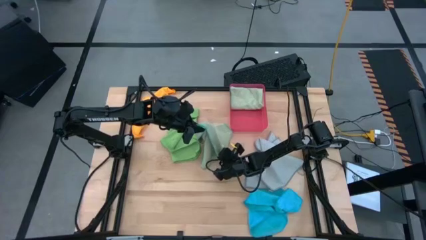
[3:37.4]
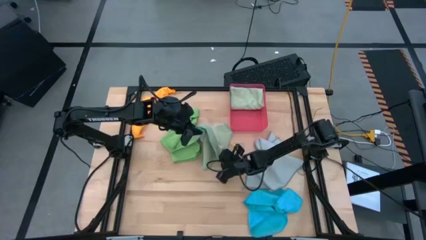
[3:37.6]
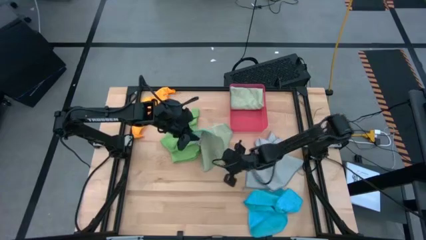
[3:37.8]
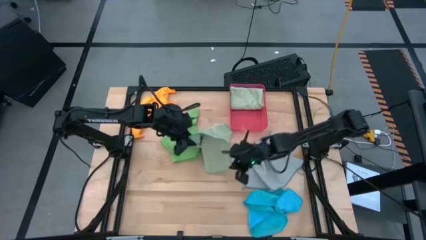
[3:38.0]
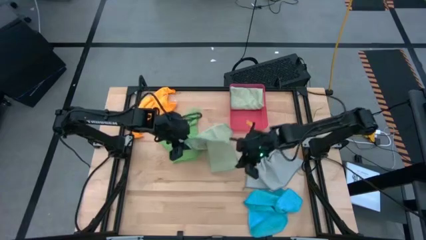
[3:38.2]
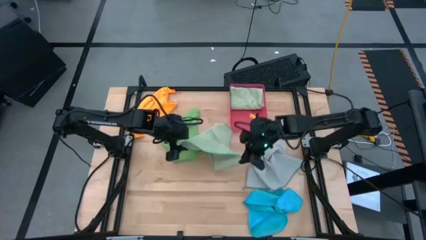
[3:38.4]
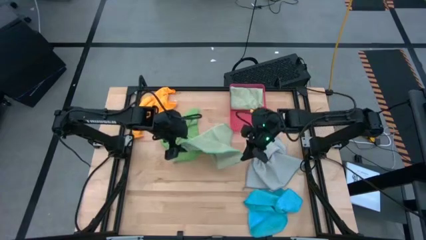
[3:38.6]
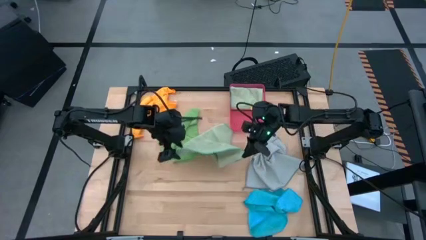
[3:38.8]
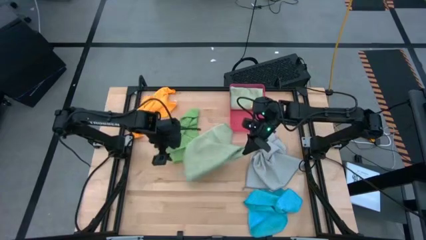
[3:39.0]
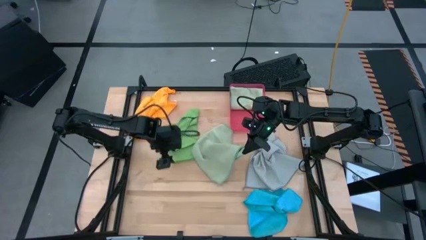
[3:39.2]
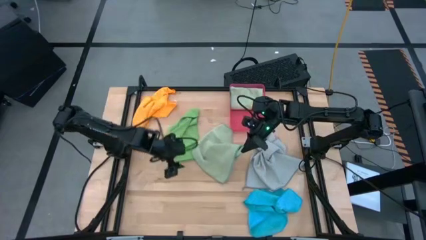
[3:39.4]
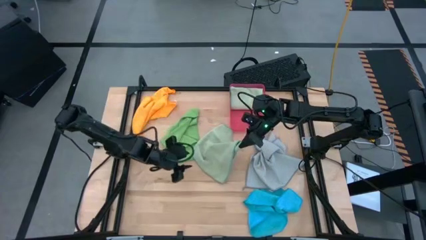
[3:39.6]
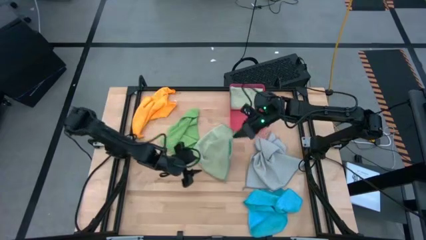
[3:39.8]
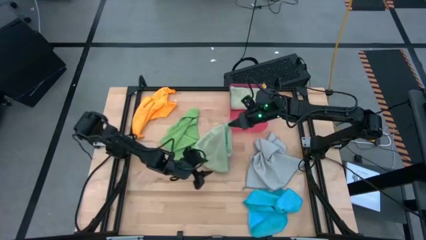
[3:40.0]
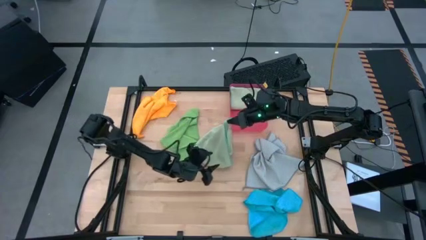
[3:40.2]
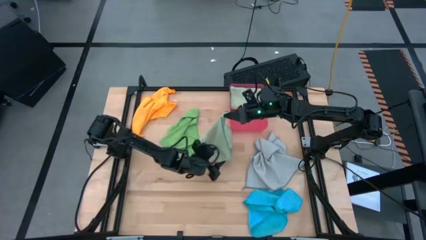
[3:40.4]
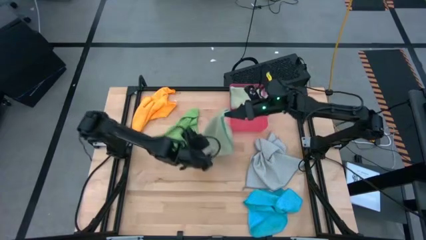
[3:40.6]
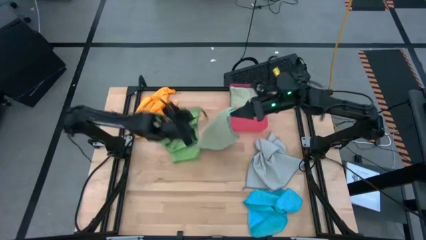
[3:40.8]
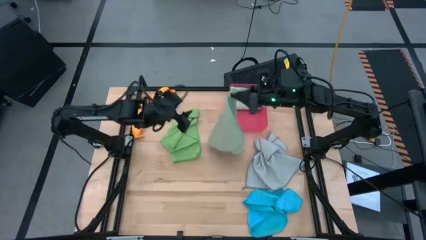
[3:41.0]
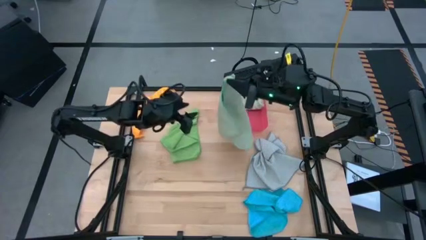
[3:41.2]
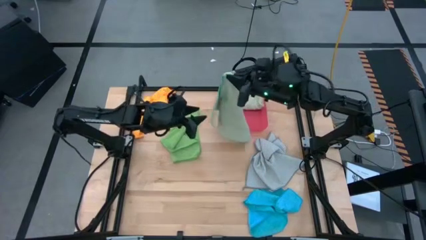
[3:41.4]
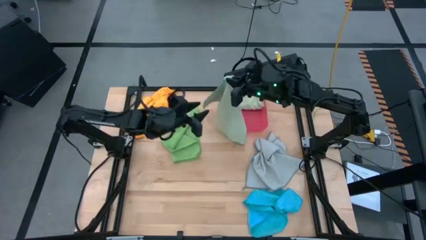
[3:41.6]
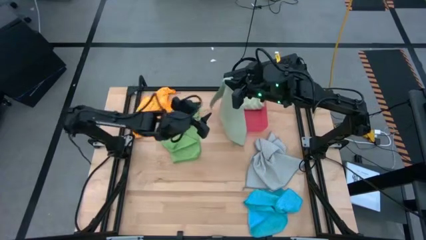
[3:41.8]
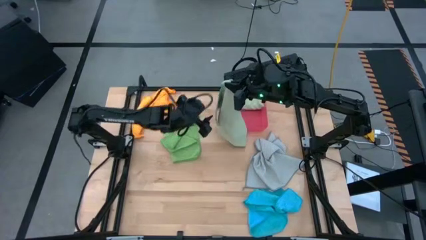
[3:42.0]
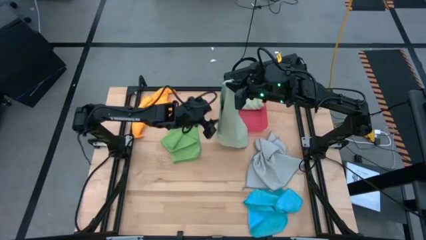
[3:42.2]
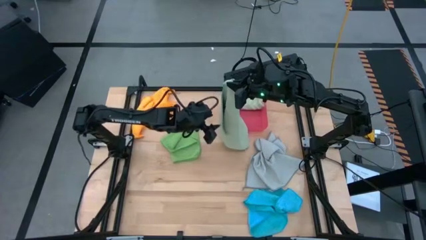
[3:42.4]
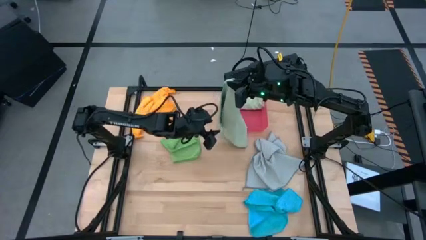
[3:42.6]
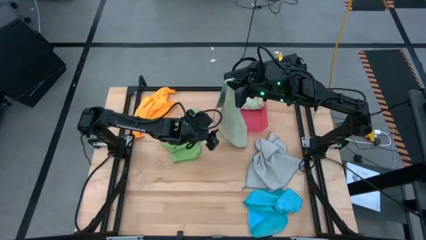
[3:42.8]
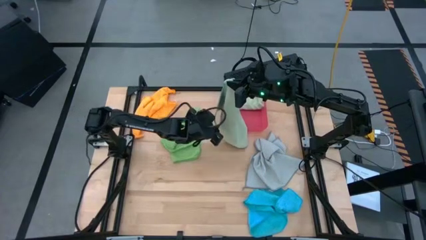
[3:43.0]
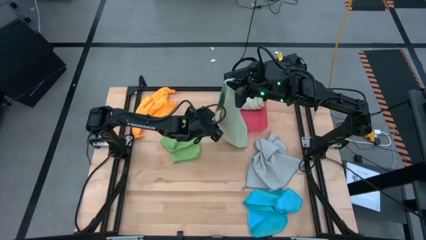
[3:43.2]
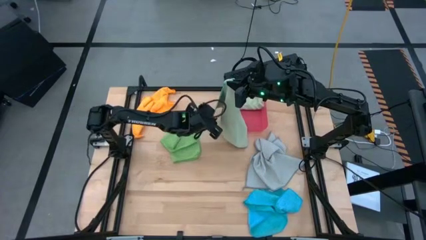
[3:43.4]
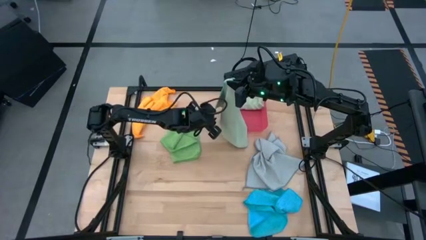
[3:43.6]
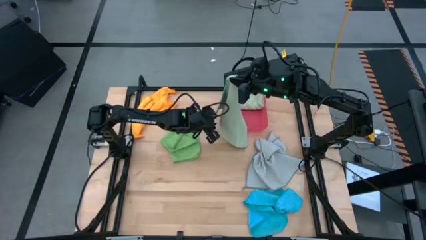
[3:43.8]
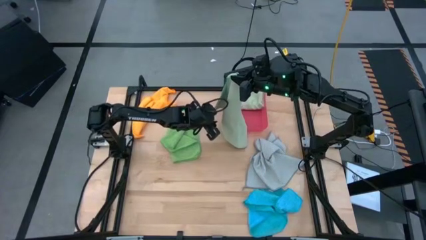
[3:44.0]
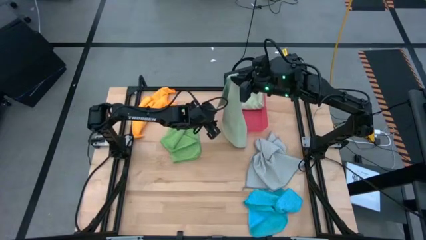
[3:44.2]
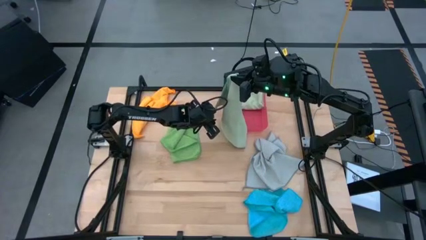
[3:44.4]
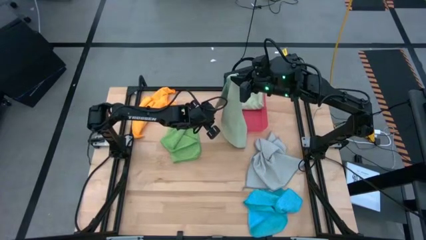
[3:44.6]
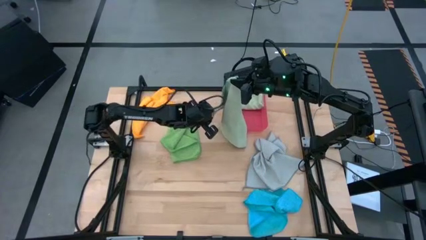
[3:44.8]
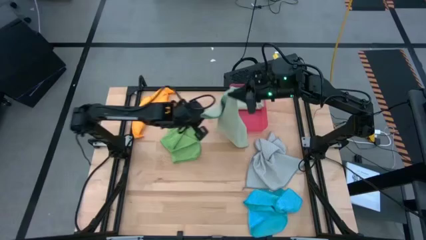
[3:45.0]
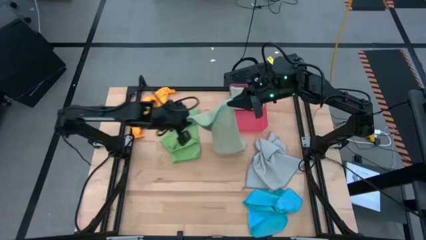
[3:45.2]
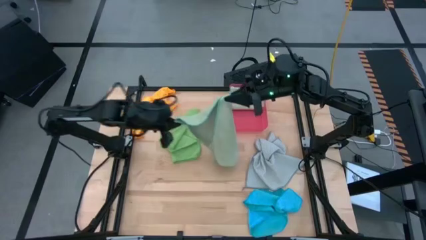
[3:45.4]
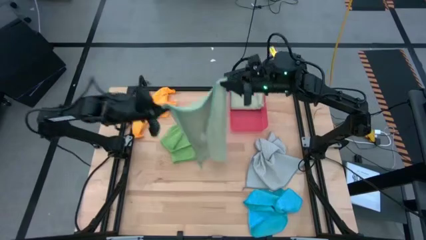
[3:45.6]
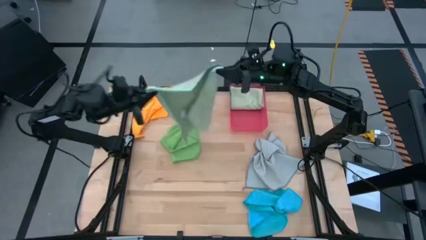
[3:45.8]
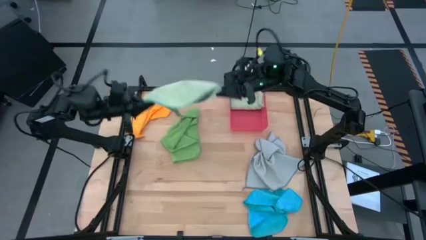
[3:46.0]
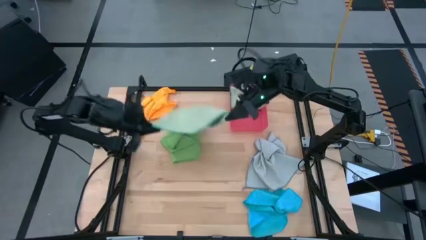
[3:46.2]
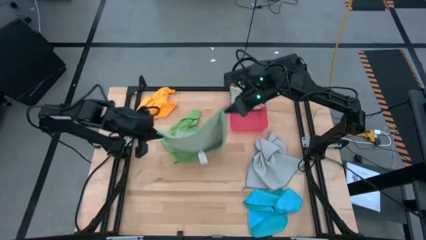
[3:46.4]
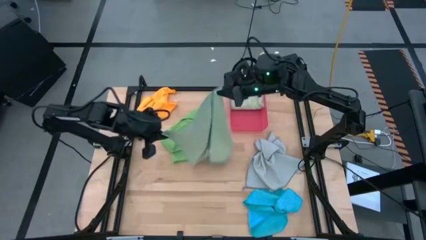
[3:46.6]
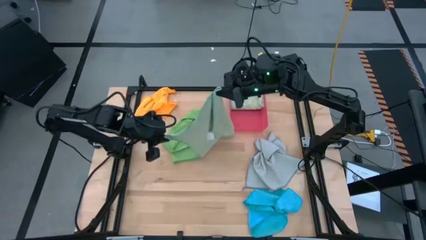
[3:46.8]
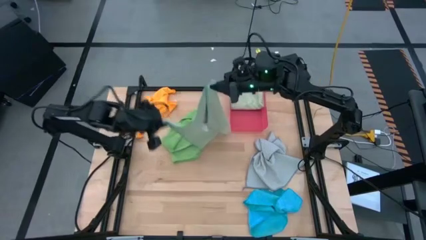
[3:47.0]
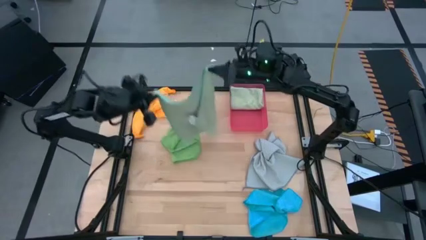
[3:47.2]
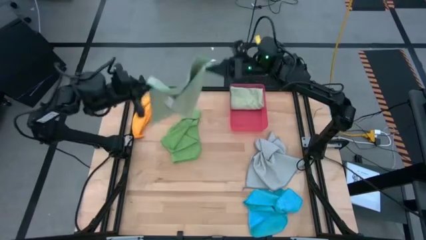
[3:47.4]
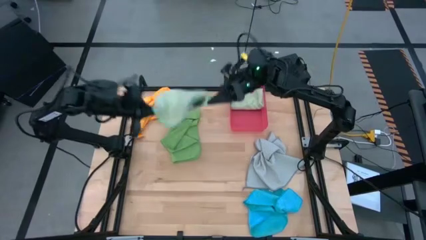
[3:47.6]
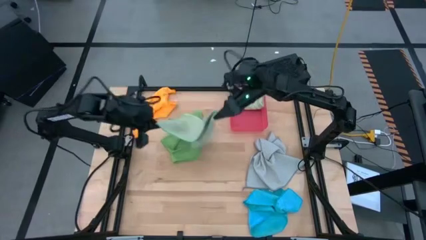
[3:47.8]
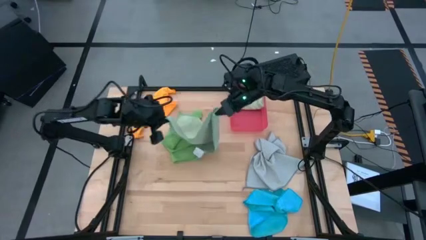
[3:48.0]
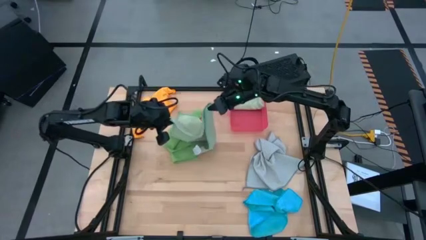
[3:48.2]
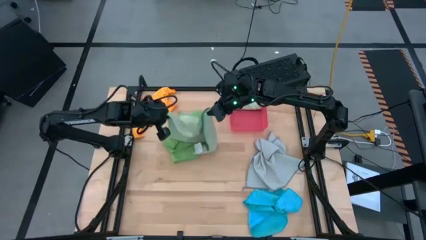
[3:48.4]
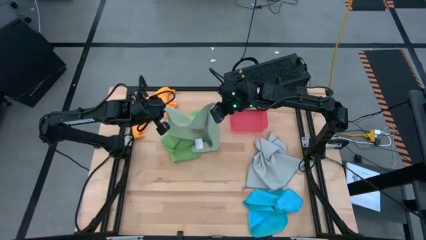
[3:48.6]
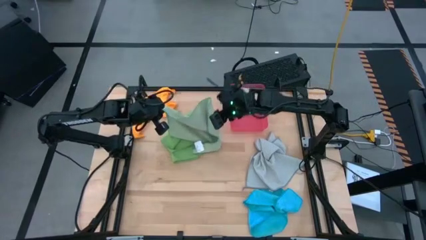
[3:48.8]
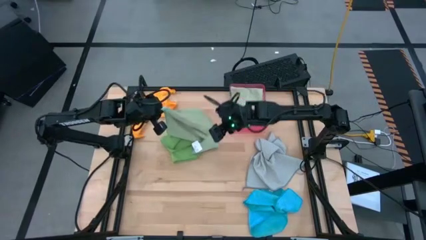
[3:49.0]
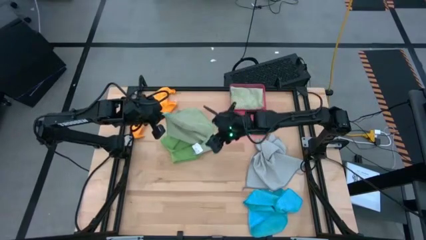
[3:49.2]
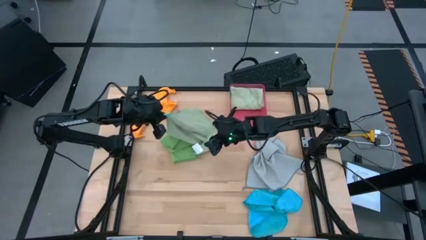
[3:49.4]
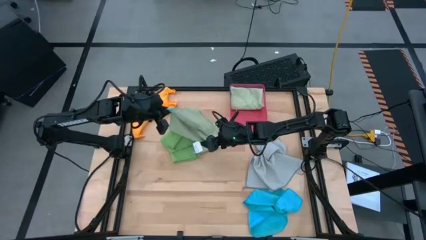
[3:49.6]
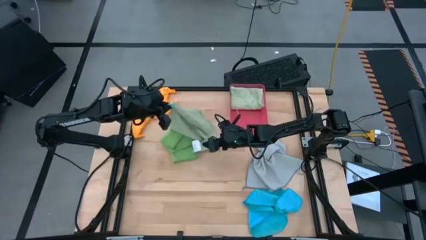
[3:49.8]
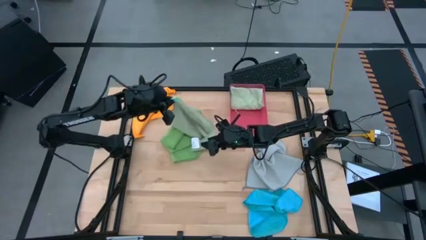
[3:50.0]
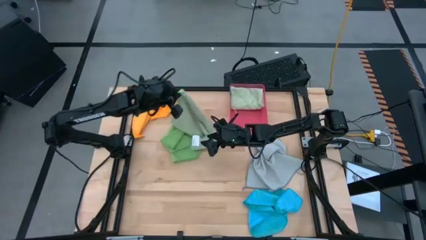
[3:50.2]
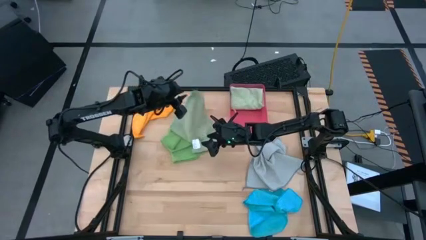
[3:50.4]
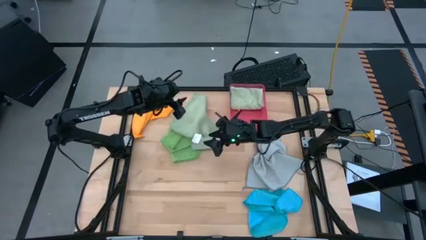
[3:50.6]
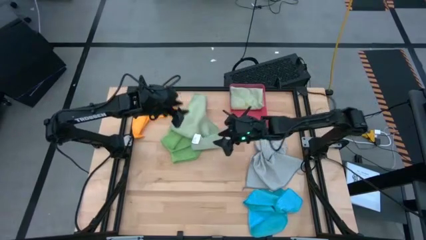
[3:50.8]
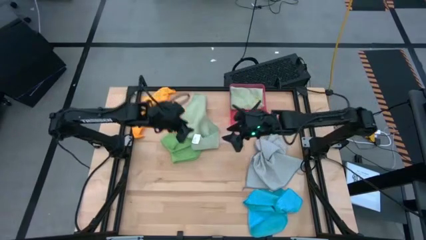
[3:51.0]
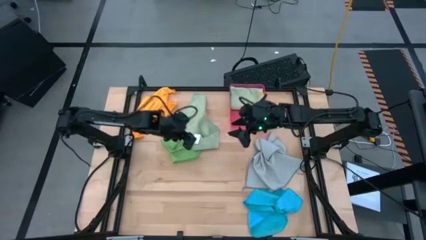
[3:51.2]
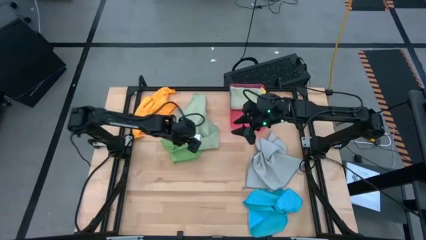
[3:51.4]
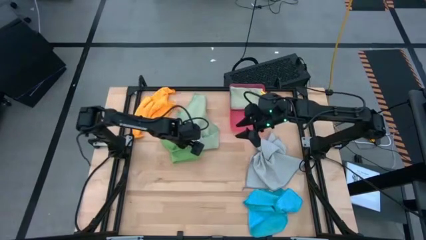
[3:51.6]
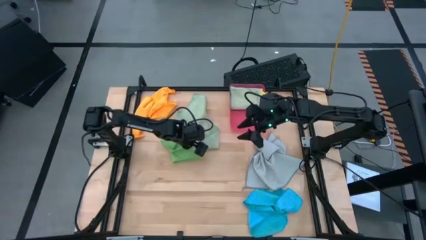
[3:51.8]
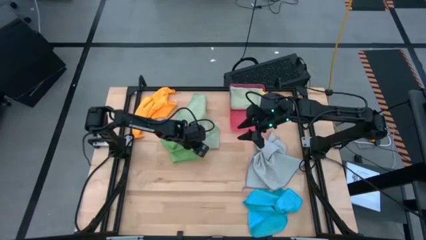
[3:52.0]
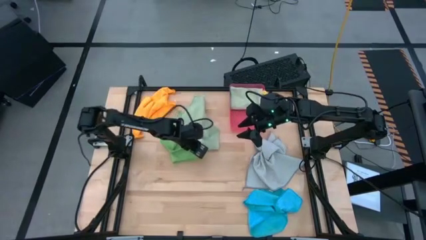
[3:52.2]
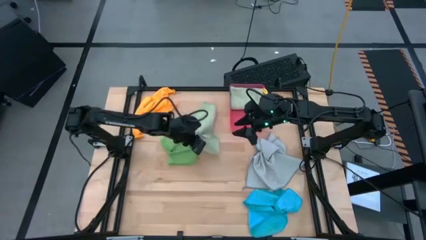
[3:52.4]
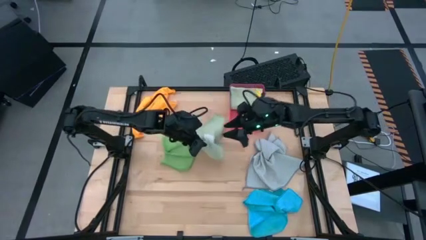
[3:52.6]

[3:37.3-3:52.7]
Task: Fold microfiber towels
Fold the light green microfiber cloth
